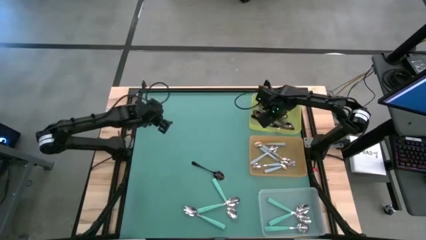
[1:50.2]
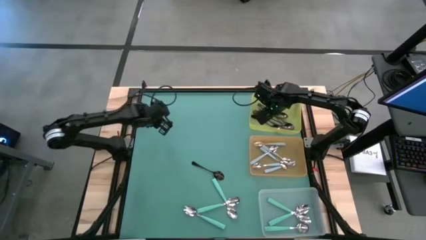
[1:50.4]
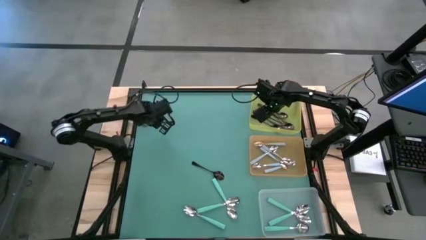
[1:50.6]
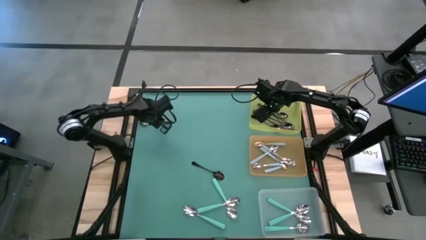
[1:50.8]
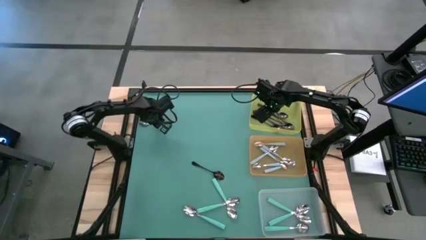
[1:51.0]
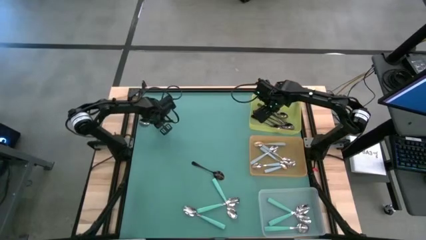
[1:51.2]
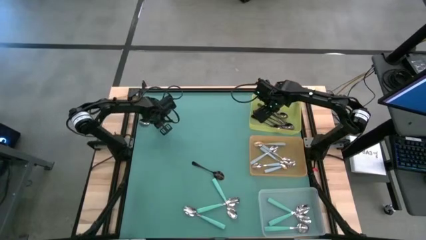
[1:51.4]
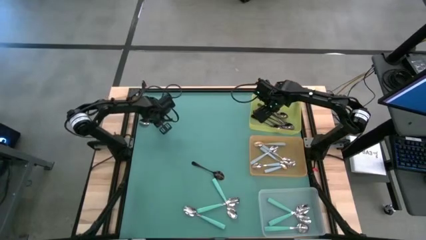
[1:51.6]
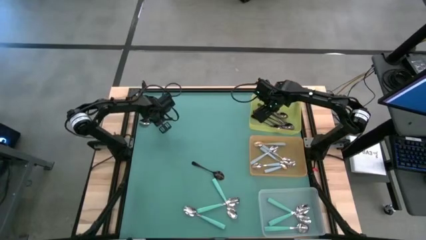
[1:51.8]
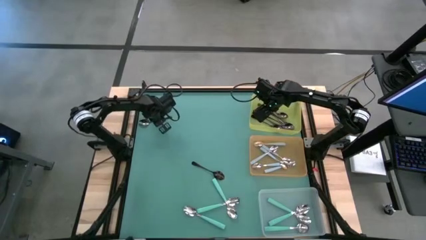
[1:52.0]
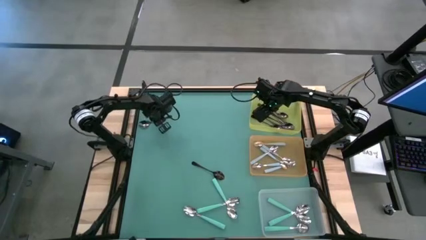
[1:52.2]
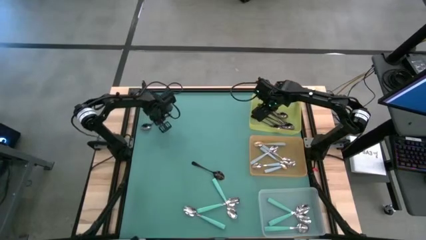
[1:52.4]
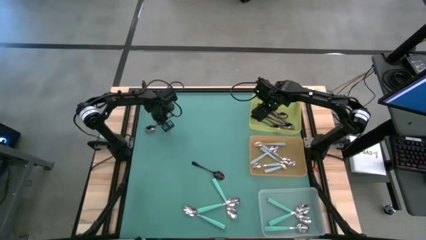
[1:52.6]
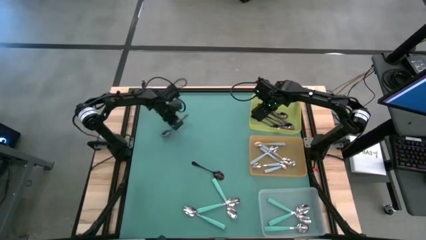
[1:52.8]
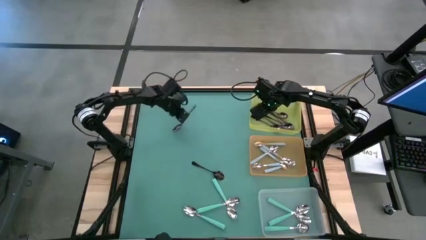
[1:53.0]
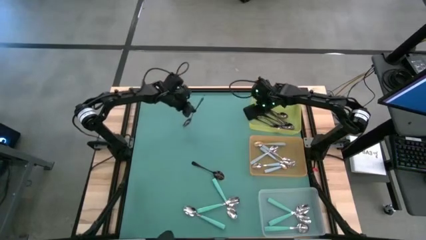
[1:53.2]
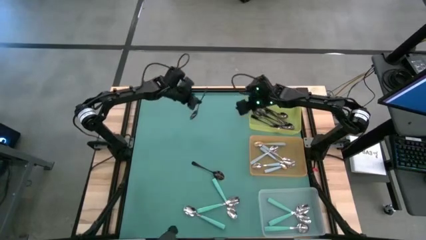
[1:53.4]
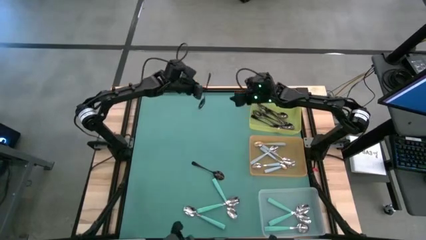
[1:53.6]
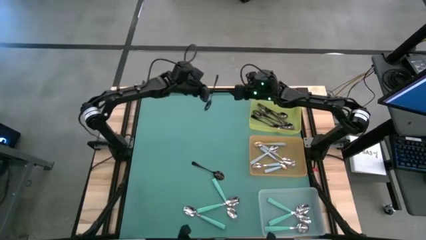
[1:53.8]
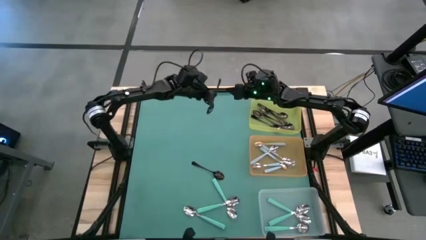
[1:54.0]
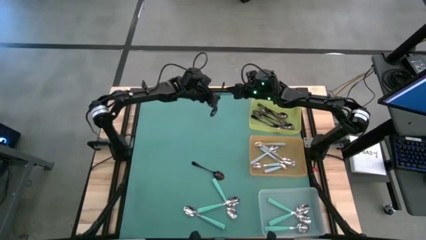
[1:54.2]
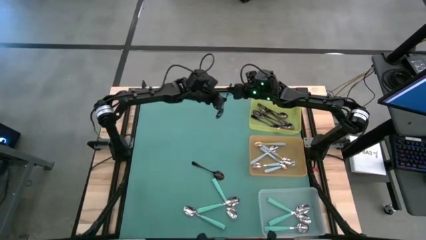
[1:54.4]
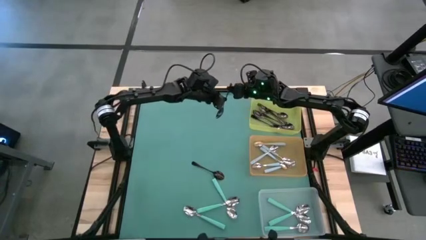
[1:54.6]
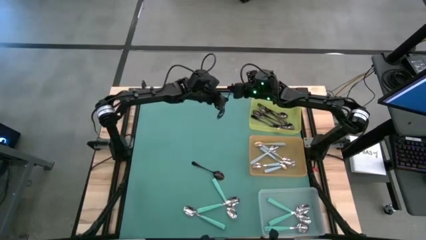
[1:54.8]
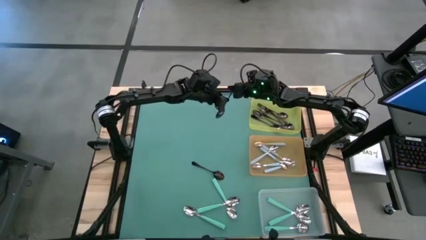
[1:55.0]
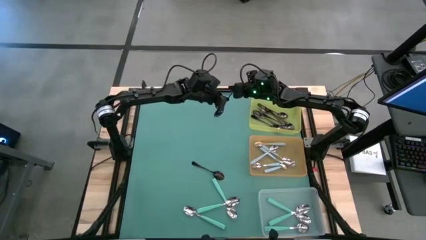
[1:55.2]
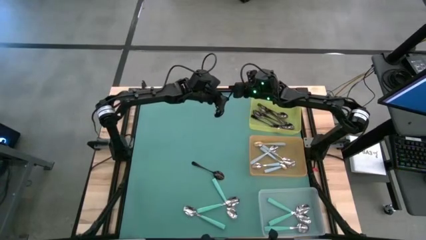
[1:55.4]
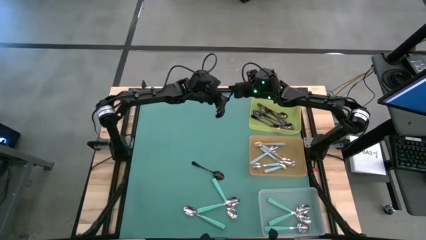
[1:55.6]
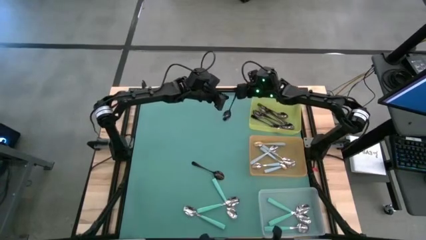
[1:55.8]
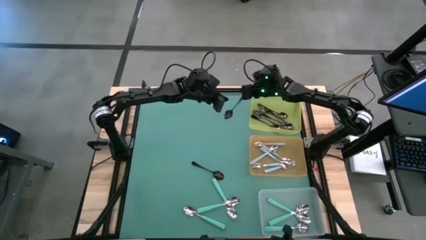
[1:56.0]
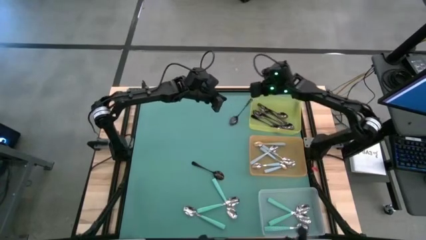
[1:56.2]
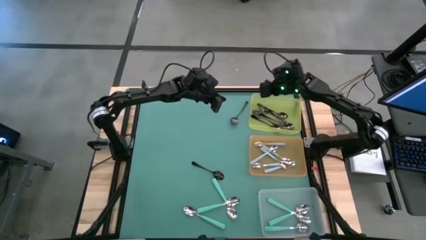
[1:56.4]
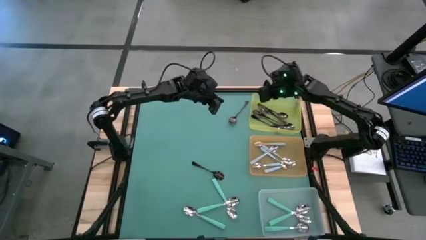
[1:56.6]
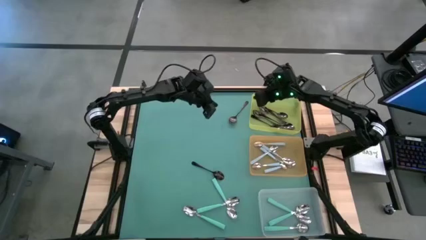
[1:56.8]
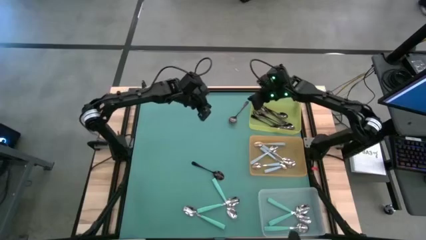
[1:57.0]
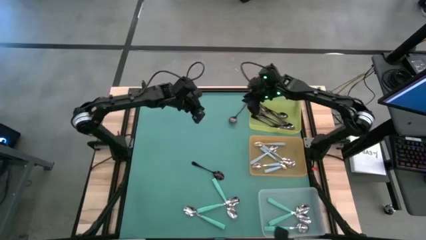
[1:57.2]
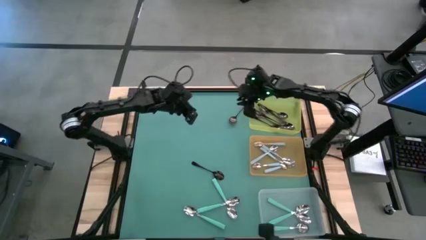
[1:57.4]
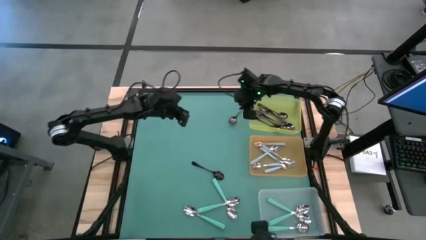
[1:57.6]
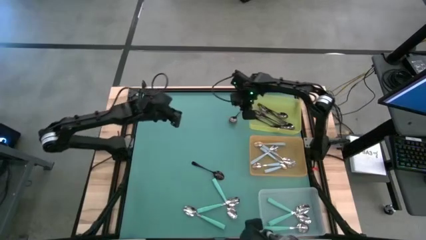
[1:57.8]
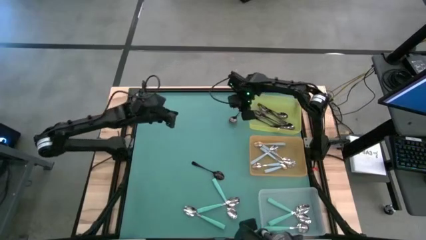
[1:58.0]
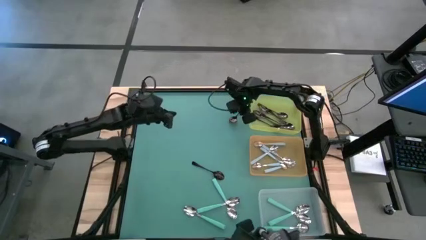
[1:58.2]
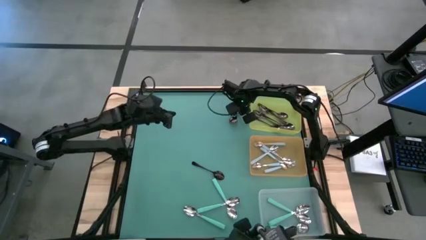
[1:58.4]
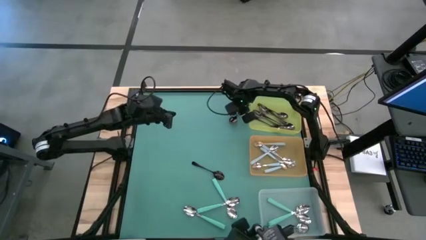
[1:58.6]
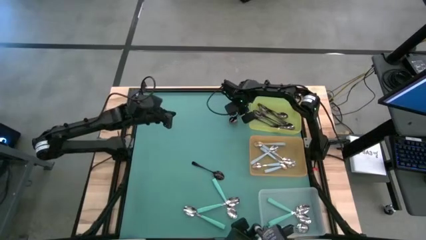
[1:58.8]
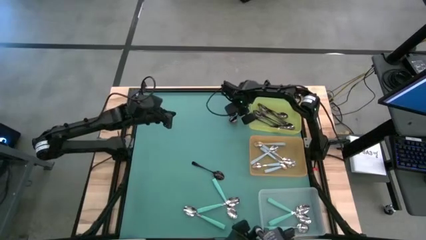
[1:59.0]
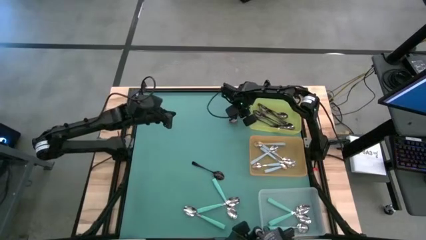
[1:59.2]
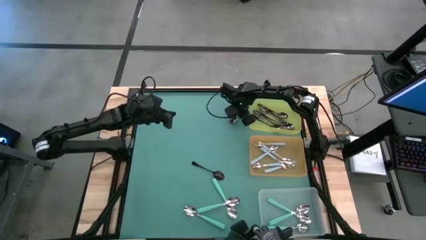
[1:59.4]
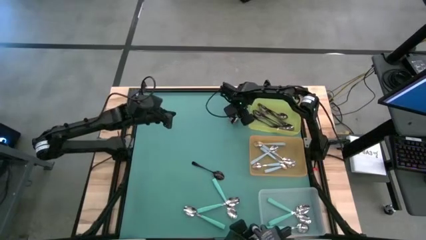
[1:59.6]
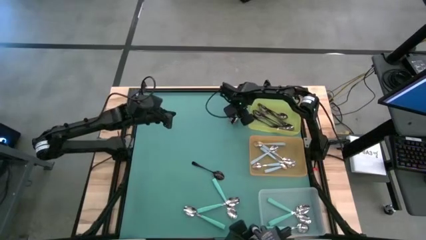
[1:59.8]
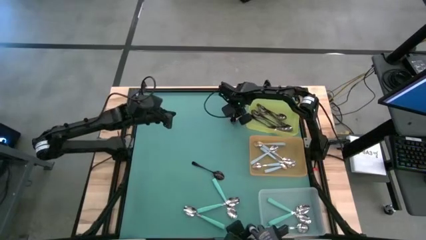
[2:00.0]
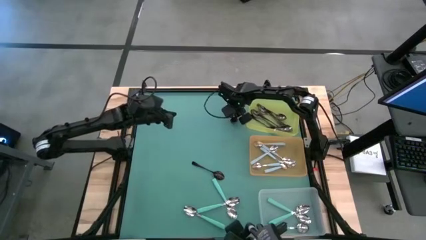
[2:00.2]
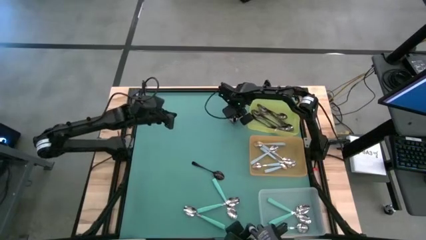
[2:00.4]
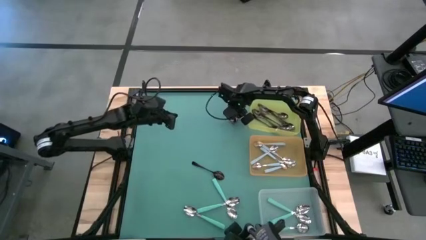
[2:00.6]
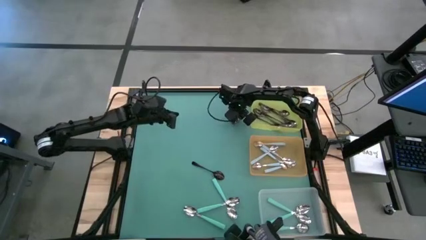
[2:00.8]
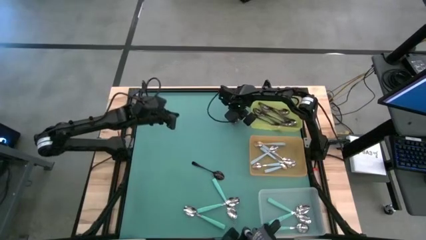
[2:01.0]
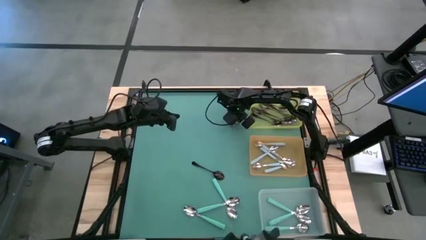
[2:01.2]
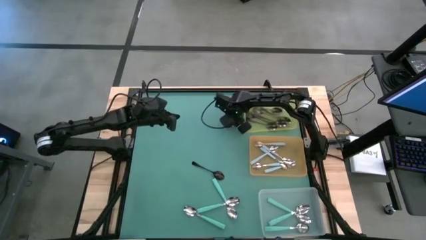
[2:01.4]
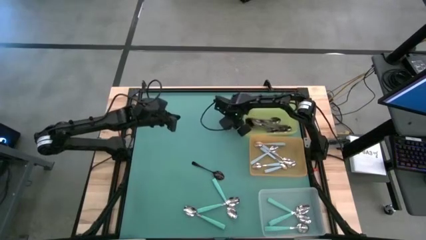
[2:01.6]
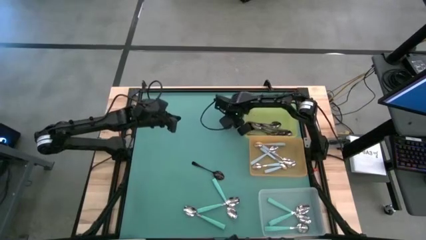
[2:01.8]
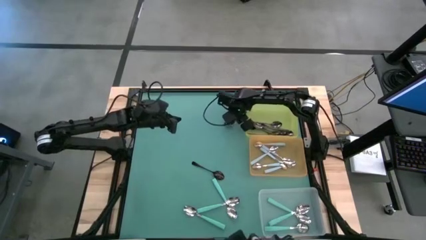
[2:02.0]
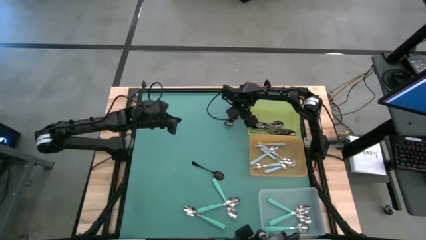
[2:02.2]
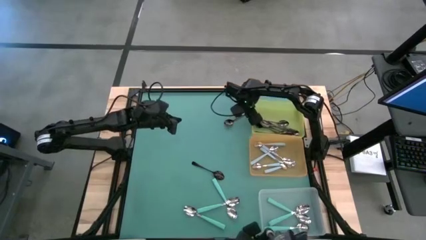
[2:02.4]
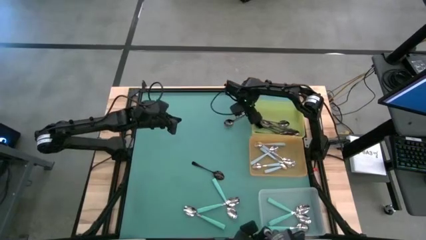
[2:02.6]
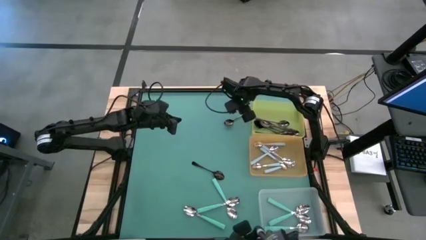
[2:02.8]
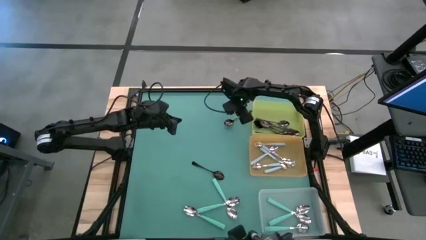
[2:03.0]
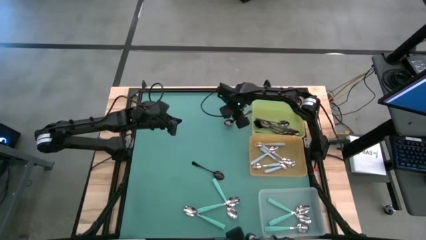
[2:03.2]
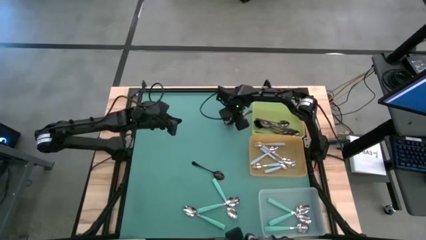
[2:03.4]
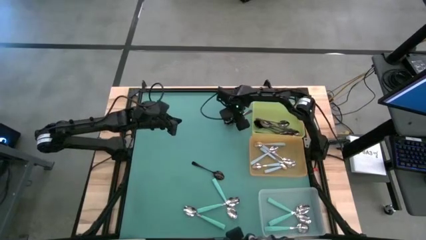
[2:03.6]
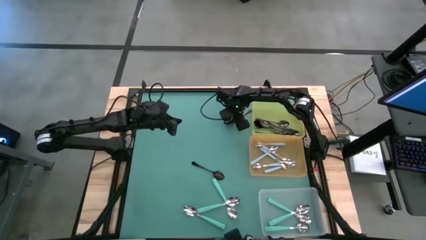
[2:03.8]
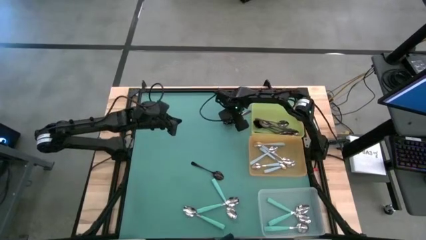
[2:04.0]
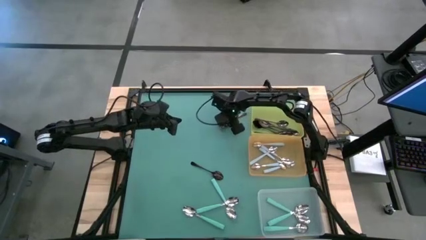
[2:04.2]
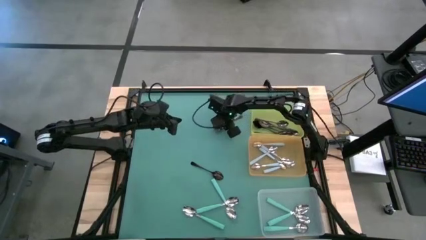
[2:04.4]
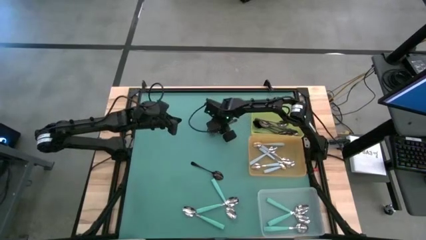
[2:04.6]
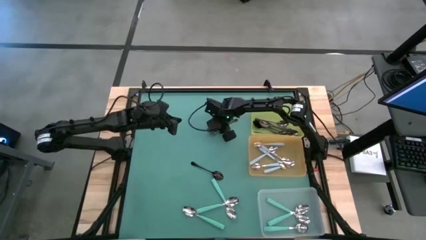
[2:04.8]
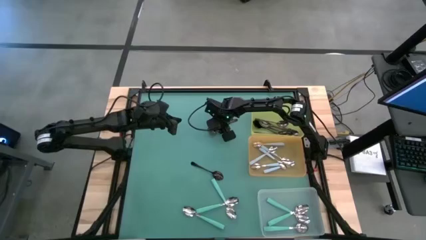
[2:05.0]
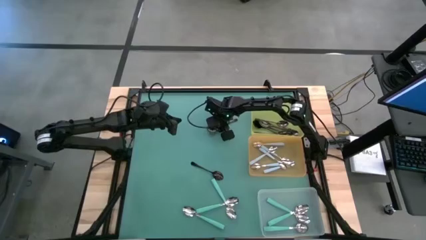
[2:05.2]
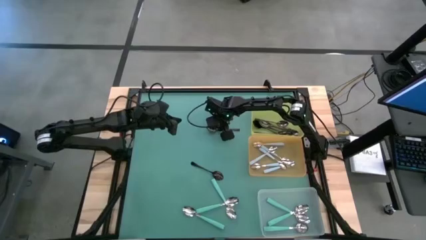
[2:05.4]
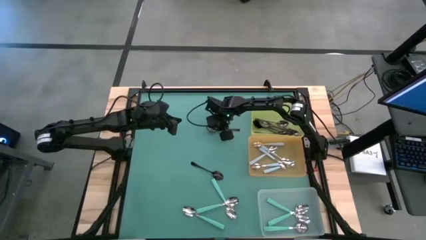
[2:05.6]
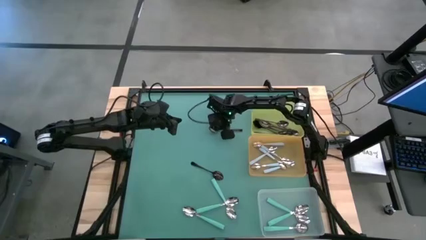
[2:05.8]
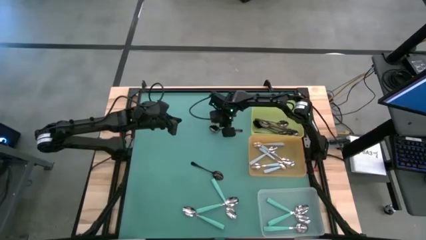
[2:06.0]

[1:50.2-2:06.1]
Task: Sort silverware by color (type)
Put the black spoon into the yellow bin

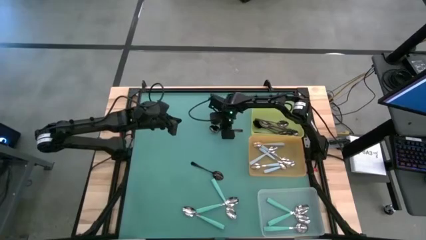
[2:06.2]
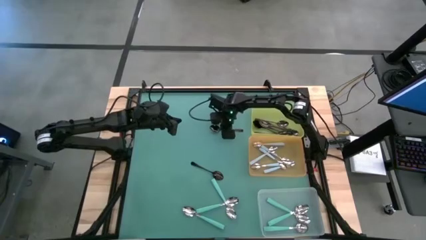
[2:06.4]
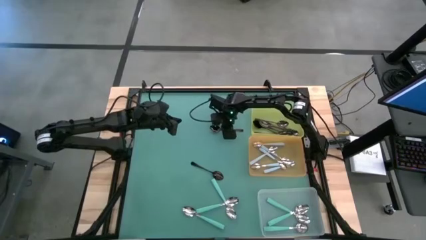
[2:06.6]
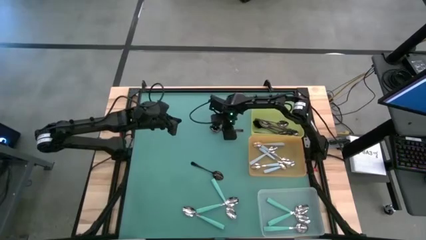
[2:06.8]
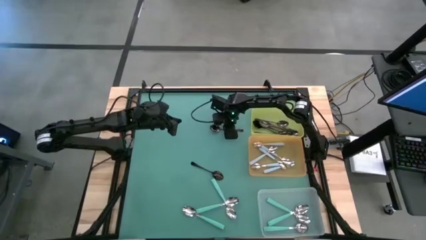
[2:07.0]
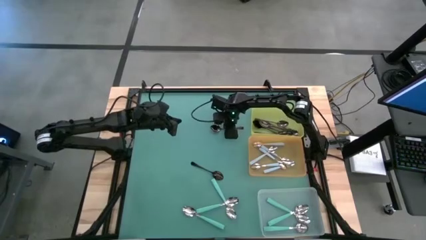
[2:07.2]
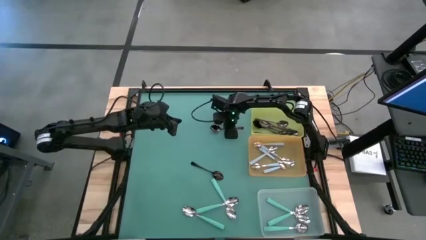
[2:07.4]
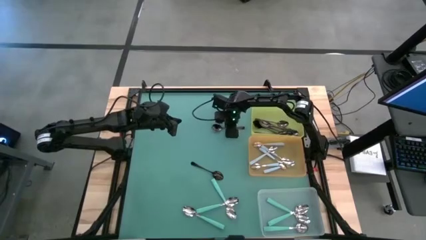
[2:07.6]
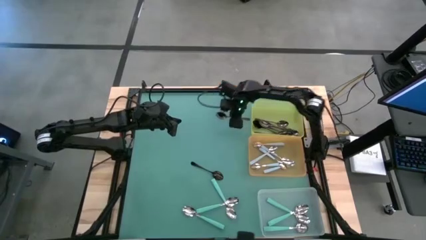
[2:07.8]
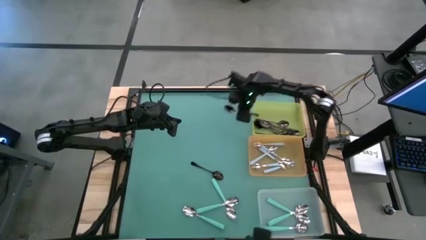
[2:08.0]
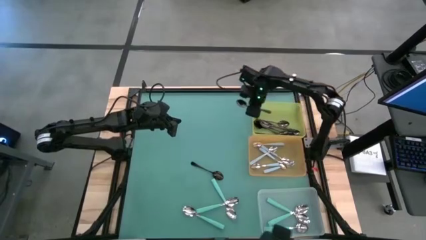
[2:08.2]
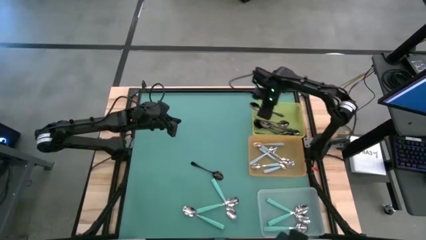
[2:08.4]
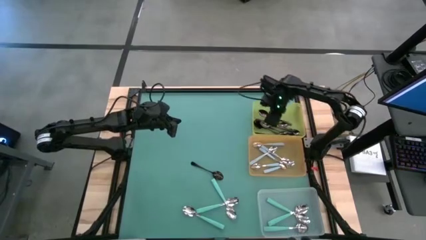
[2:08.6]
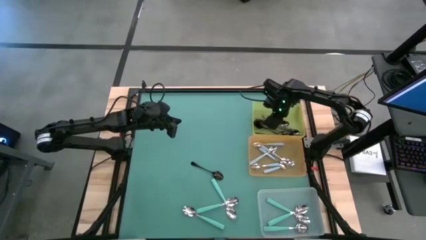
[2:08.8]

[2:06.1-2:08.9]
Put the black spoon into the yellow bin
